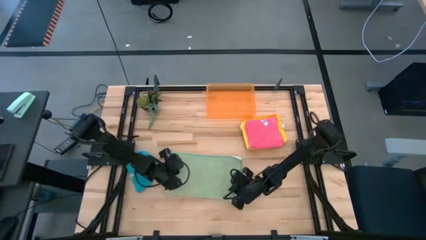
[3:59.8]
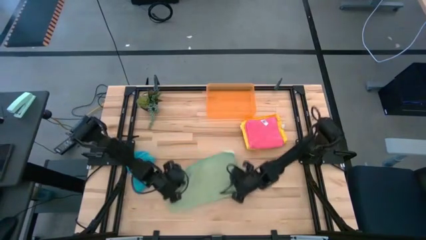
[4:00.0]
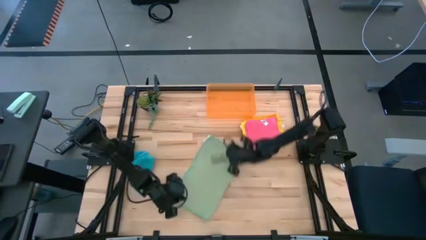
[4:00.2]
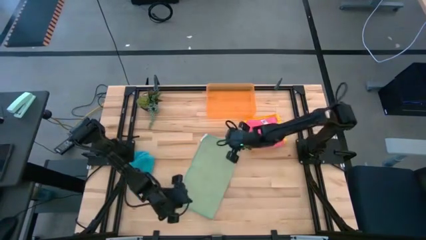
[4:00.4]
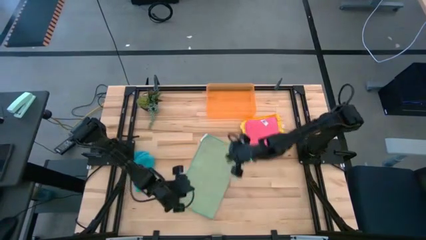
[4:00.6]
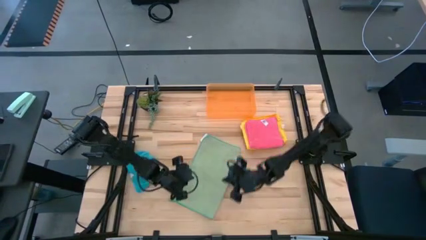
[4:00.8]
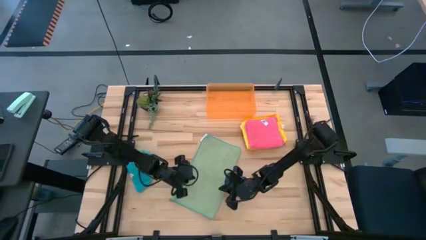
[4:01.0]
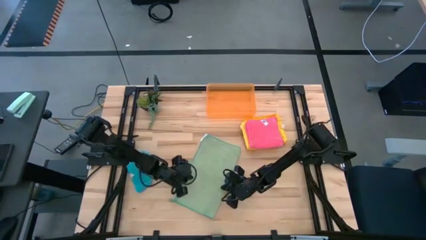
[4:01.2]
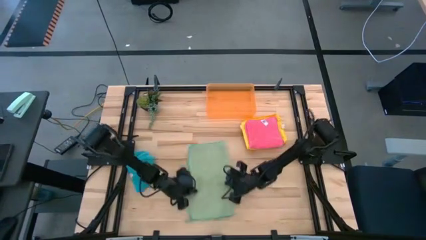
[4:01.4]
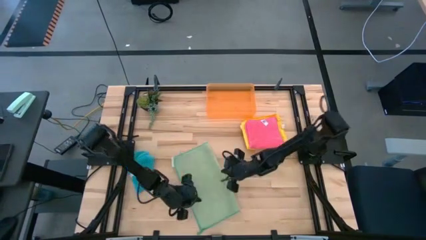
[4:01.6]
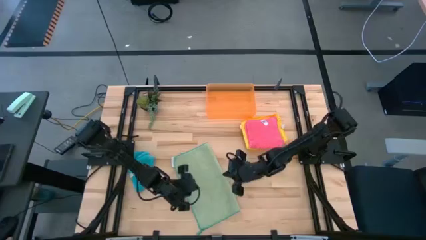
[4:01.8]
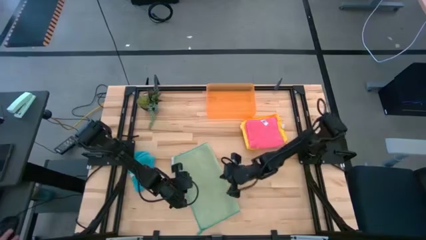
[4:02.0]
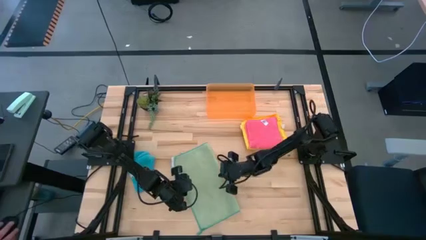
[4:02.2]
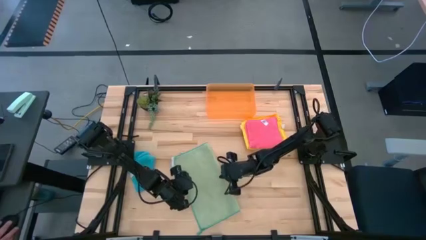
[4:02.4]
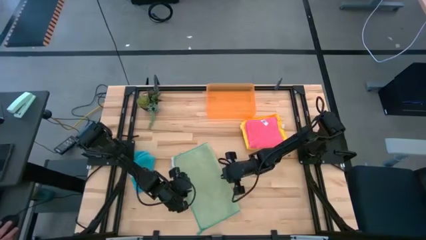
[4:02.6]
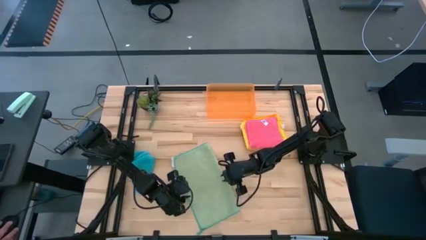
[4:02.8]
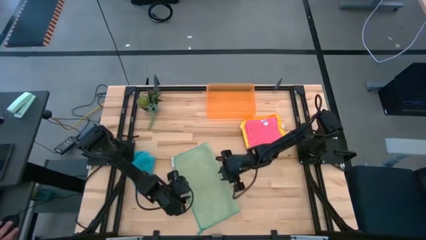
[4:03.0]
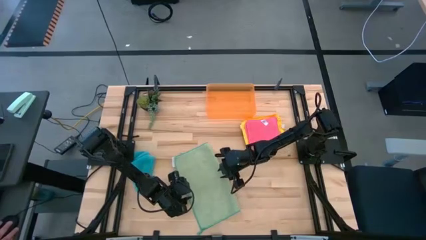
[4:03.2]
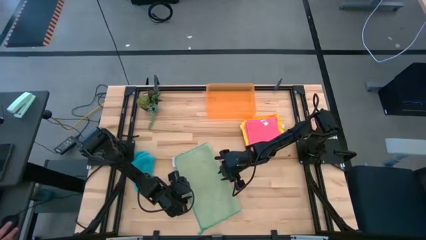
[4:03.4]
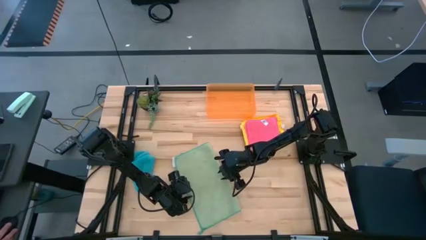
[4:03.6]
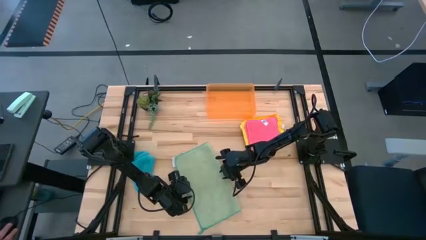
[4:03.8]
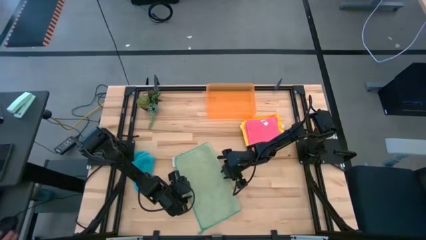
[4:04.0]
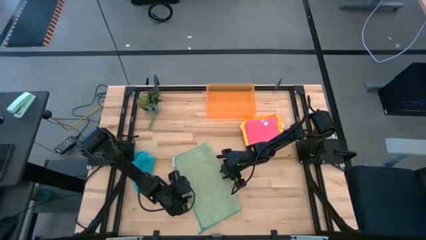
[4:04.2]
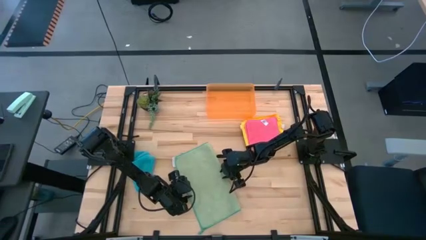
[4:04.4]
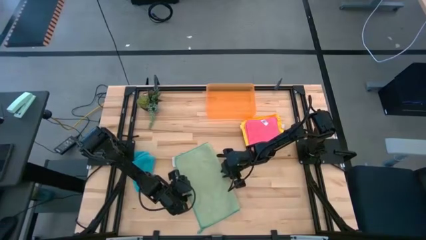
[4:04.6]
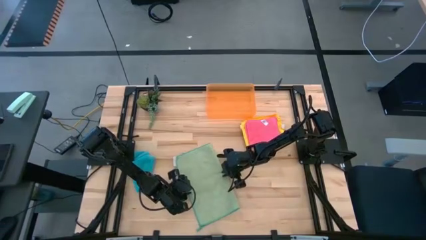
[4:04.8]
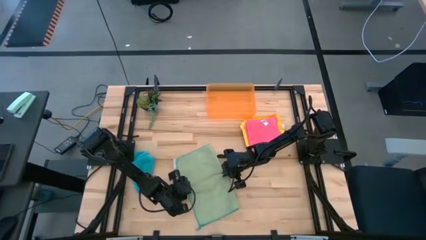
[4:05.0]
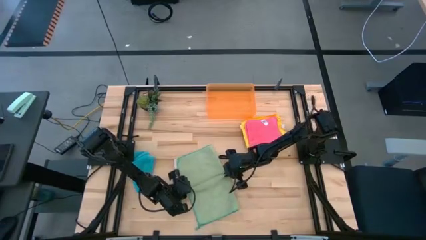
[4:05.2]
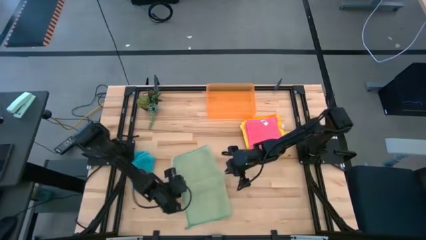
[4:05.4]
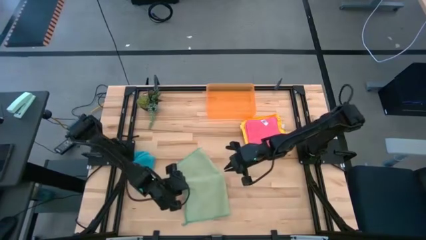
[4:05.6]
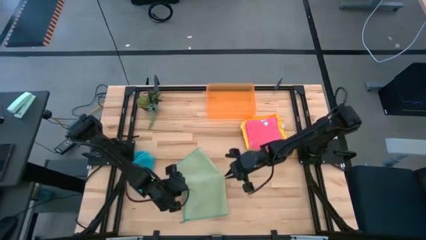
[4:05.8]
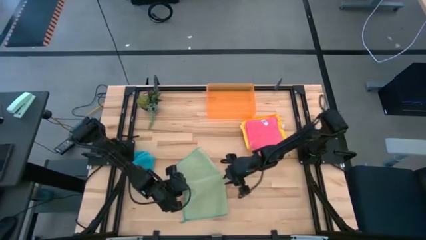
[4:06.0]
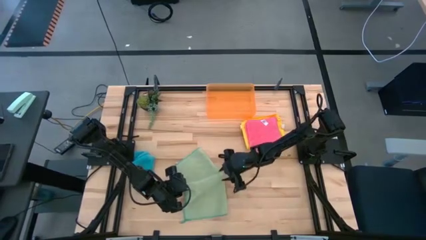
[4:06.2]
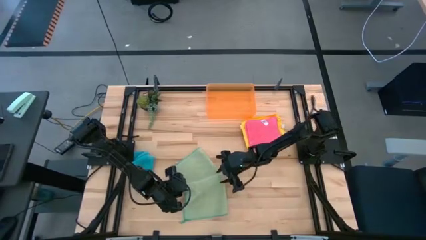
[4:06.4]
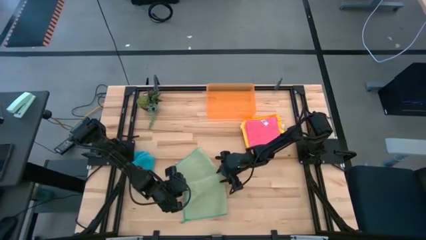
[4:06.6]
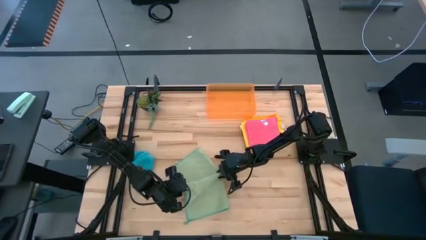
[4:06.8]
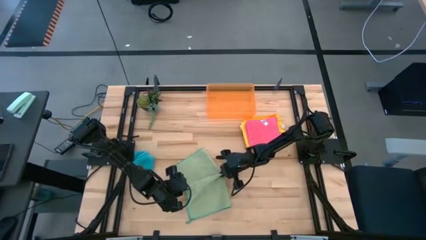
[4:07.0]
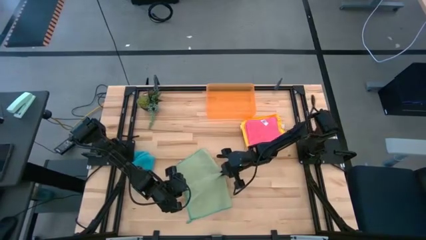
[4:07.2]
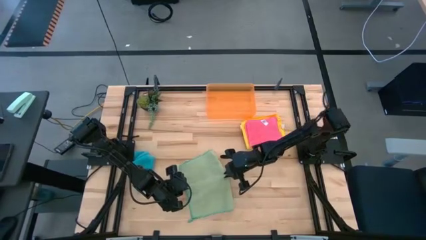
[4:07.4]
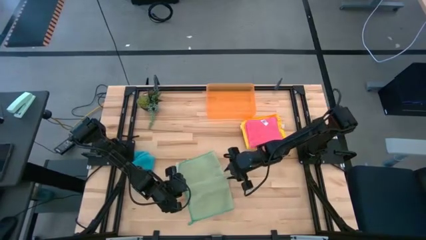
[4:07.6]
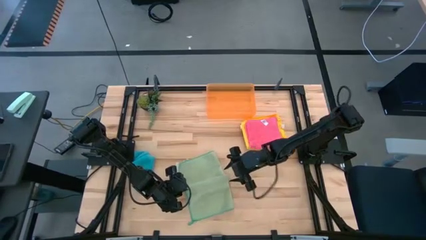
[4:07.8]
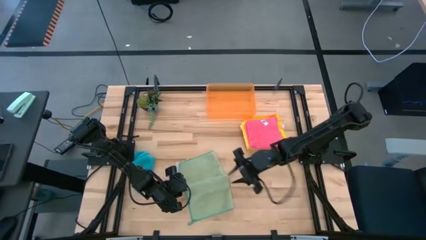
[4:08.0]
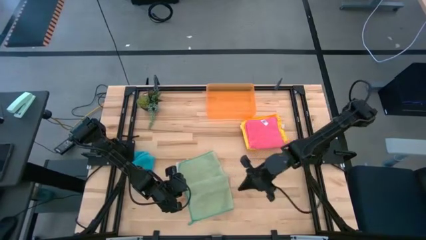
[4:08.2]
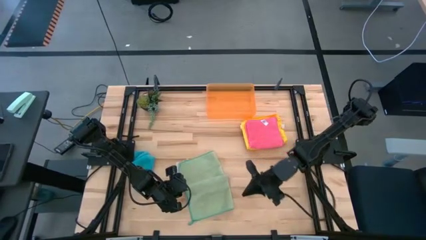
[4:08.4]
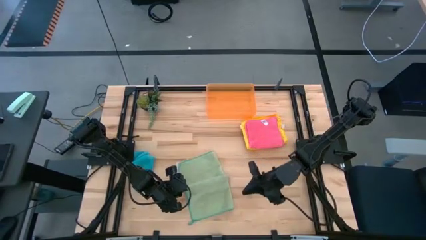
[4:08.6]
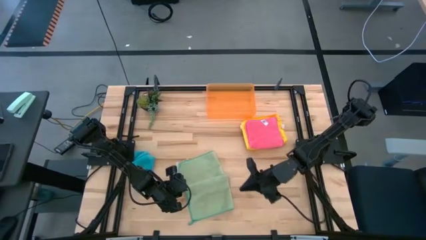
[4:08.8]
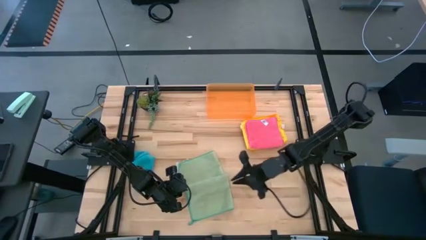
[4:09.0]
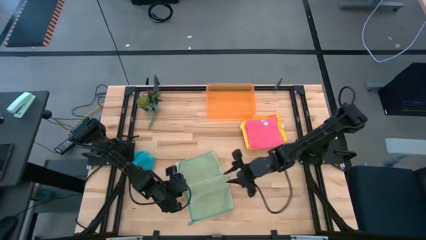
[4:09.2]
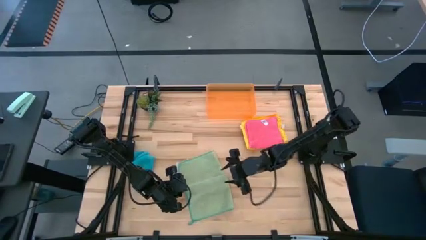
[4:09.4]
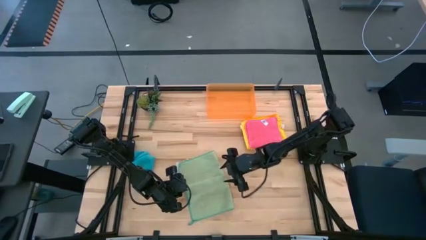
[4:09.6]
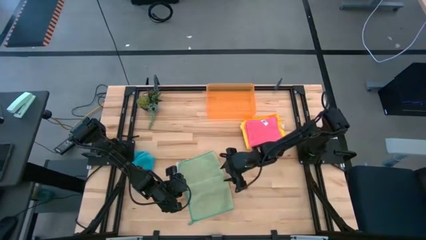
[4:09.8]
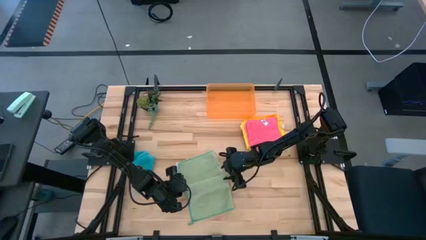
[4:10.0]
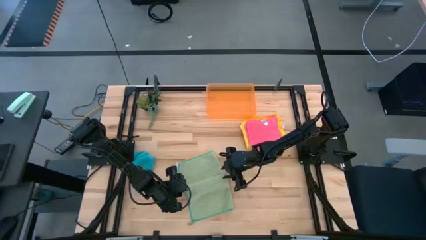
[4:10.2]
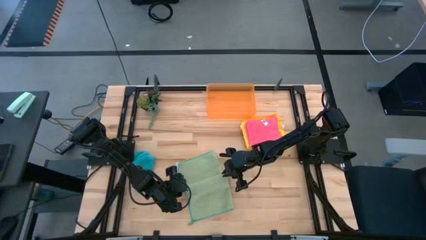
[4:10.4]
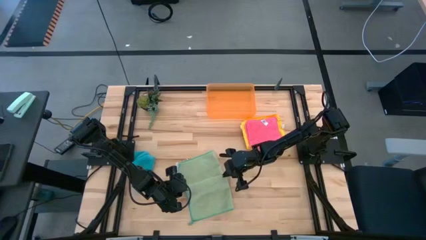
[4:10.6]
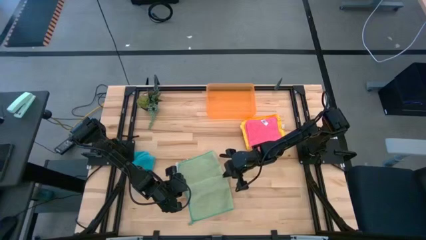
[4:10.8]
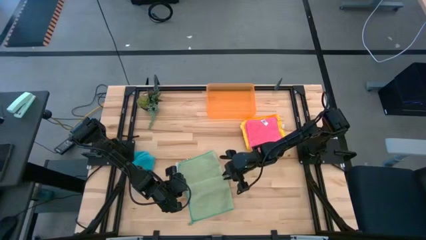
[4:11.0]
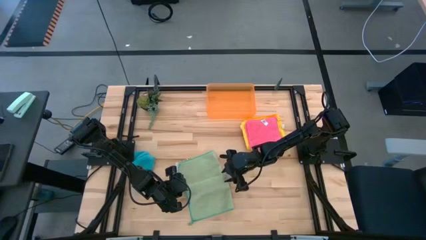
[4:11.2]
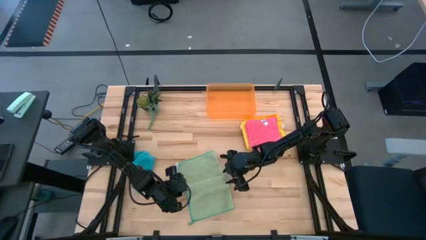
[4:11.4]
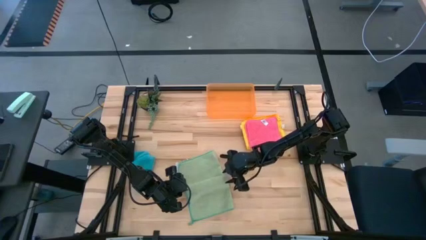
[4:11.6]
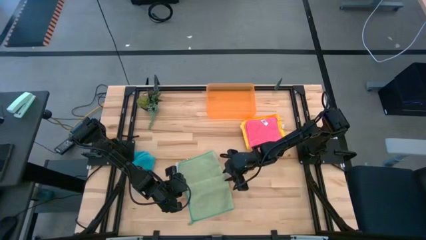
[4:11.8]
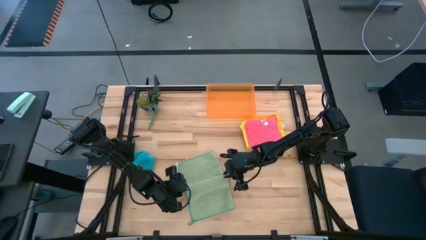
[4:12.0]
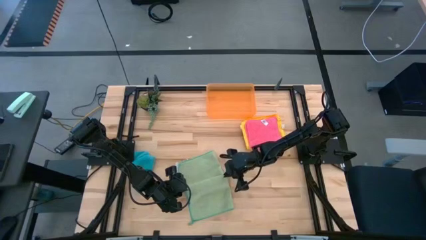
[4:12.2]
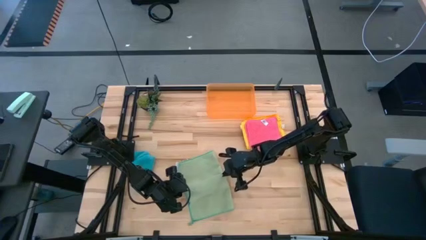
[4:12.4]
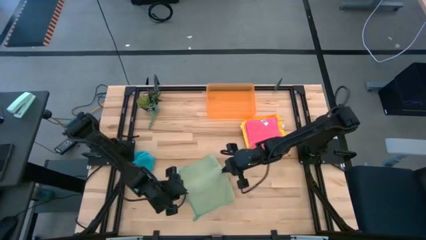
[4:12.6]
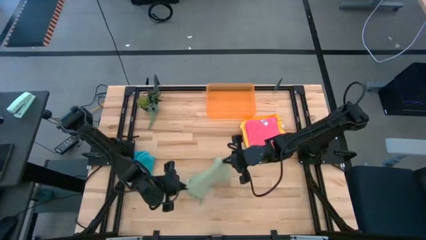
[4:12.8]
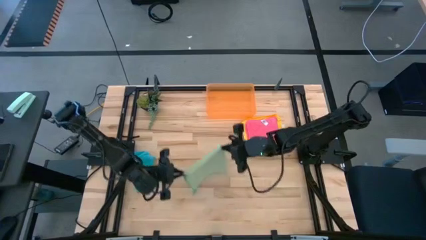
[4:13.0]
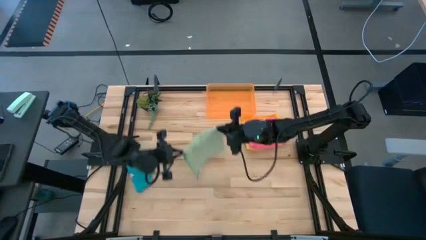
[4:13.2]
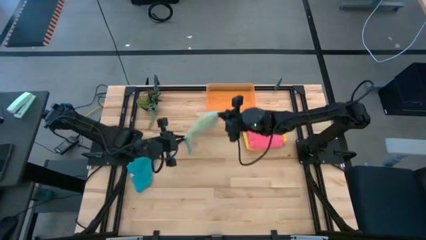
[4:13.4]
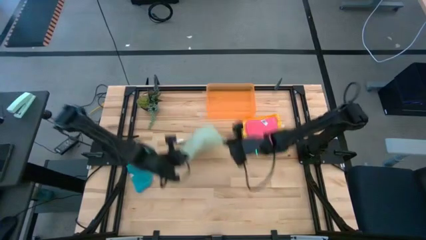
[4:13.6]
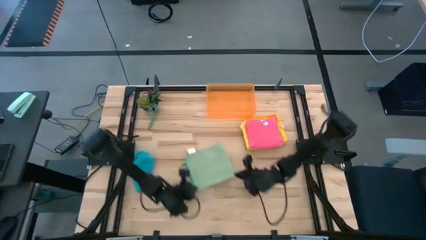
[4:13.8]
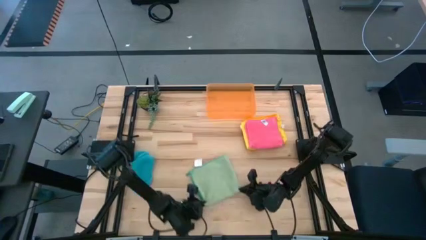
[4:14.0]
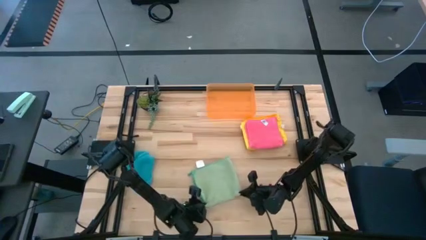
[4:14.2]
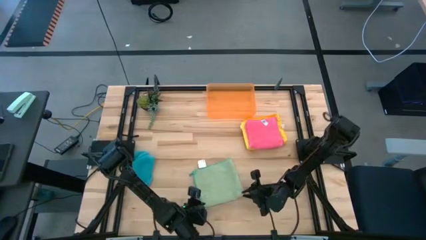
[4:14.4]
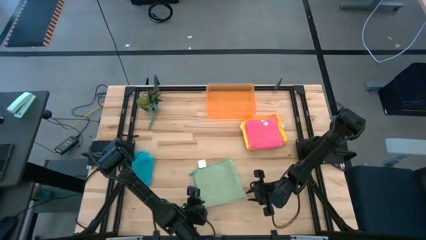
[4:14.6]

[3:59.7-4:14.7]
Task: Fold microfiber towels
Fold the green microfiber cloth

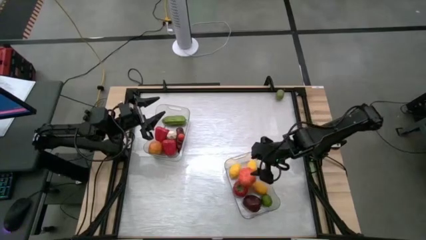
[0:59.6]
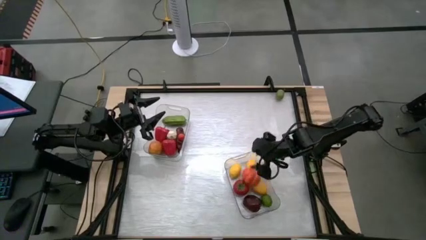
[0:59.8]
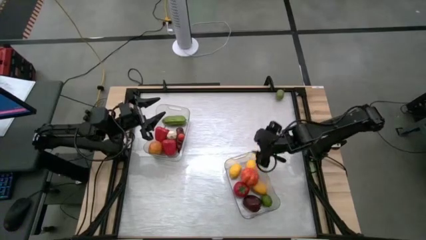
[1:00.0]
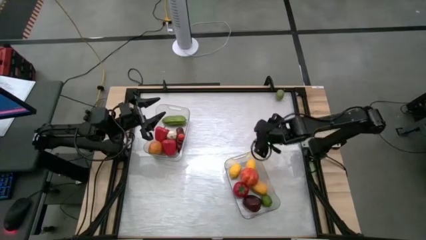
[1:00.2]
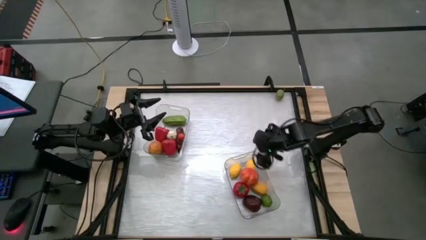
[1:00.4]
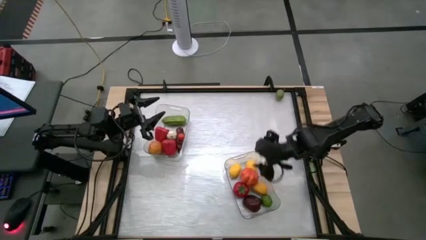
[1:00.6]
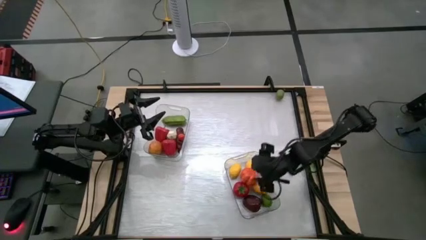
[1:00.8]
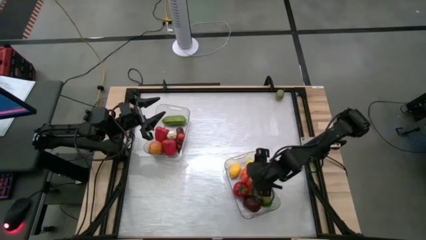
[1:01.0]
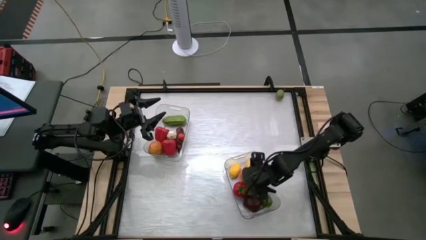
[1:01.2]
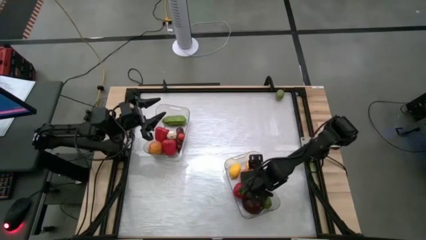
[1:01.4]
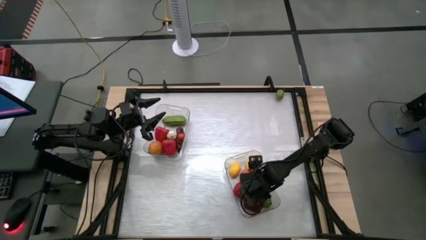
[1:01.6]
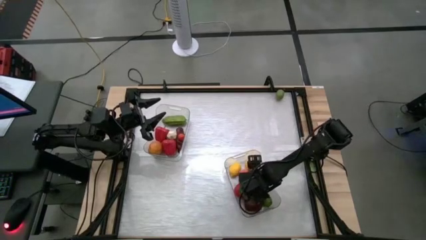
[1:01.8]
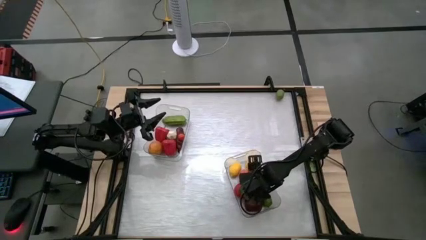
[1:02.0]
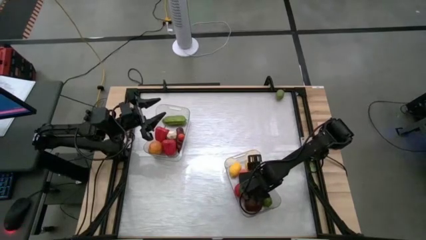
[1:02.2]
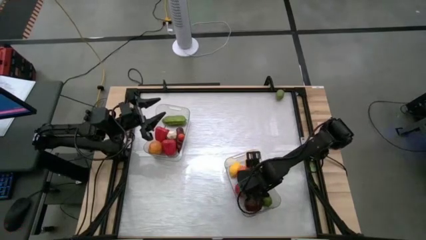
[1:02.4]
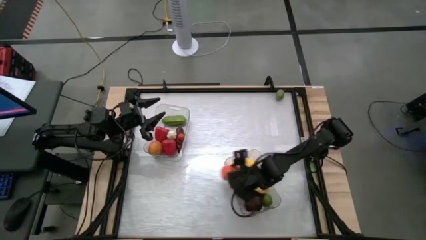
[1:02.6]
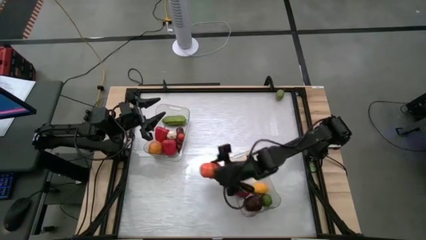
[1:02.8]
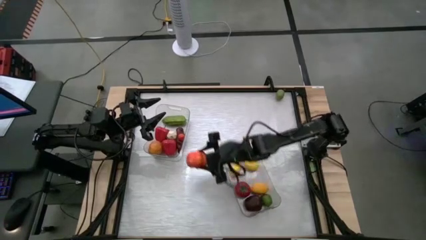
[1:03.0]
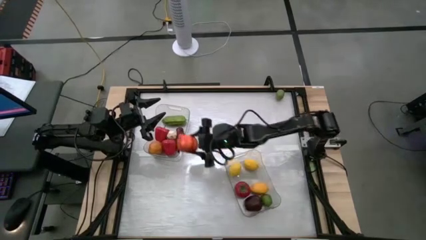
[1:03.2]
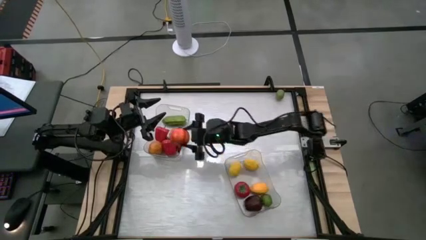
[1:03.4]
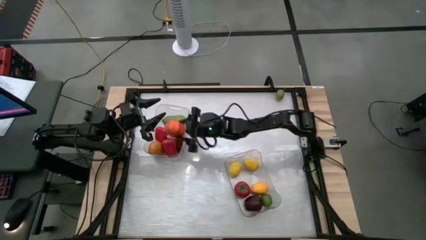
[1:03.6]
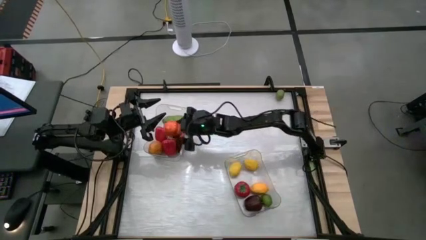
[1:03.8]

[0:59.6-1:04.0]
Task: Sort produce into baskets
Move the orange squash from the right transparent bin to the left transparent bin
